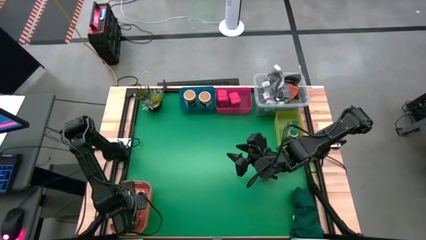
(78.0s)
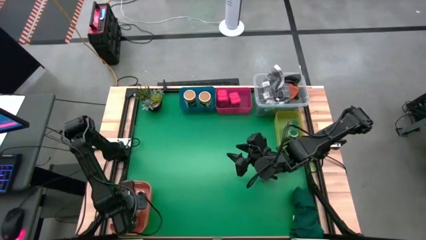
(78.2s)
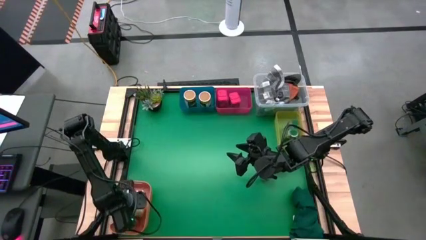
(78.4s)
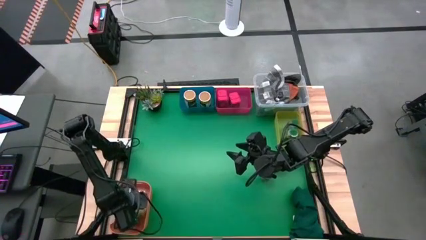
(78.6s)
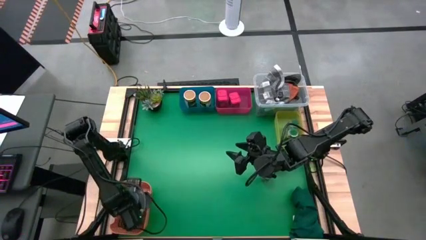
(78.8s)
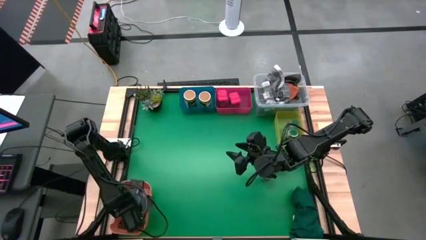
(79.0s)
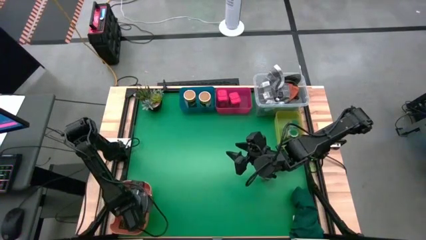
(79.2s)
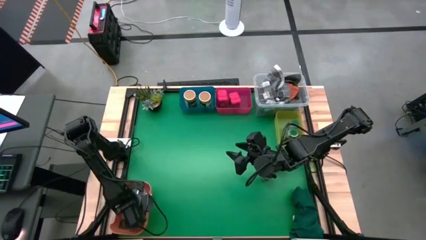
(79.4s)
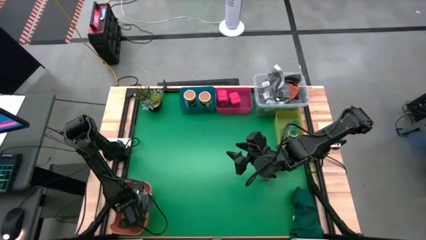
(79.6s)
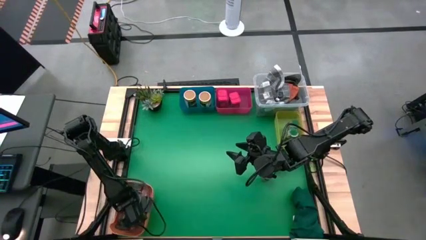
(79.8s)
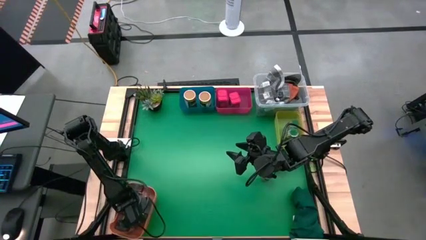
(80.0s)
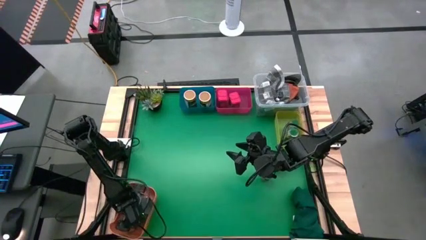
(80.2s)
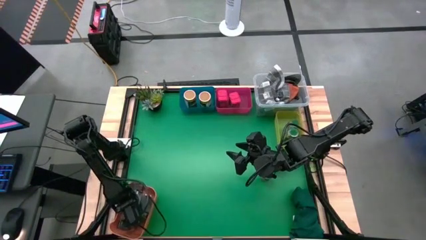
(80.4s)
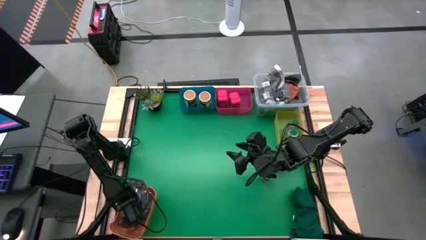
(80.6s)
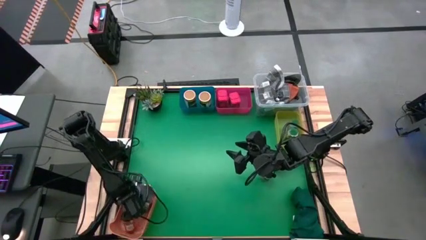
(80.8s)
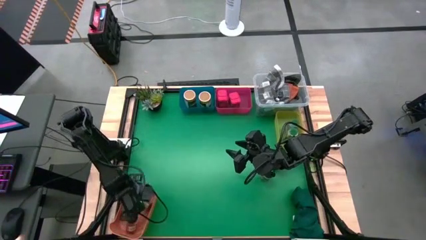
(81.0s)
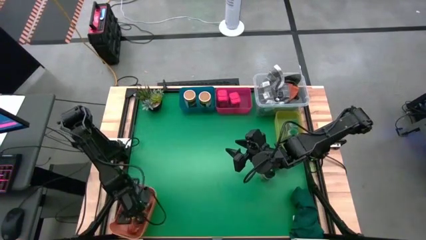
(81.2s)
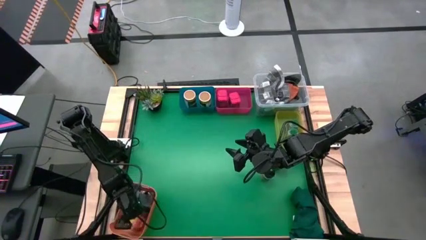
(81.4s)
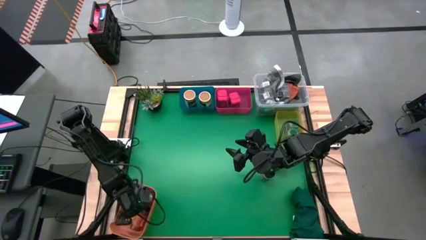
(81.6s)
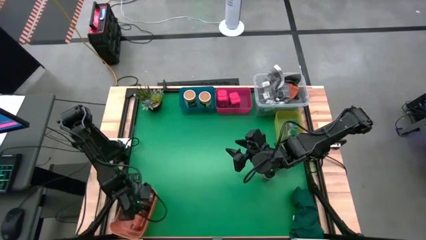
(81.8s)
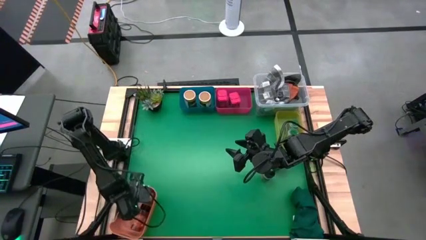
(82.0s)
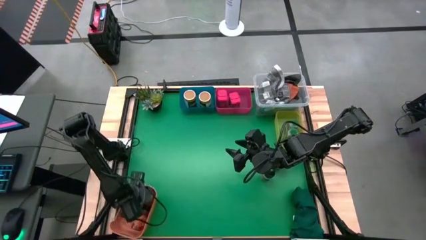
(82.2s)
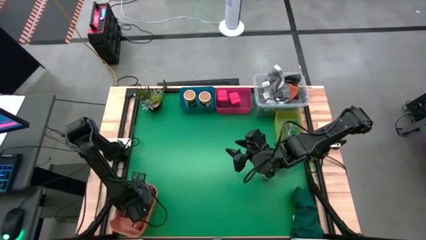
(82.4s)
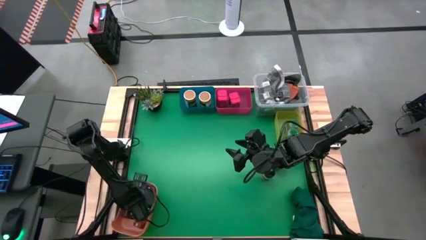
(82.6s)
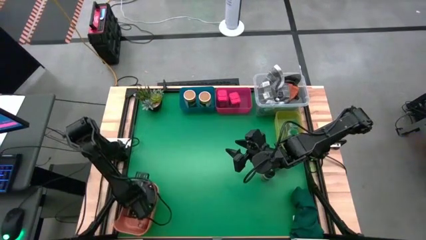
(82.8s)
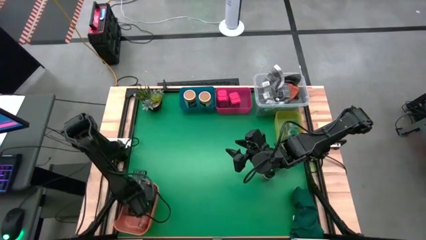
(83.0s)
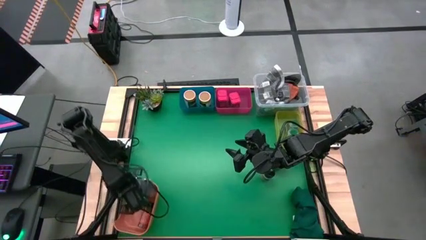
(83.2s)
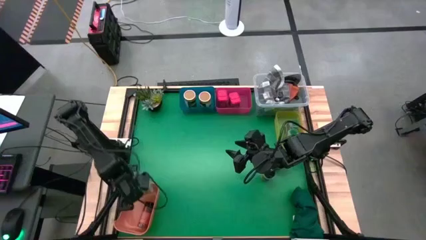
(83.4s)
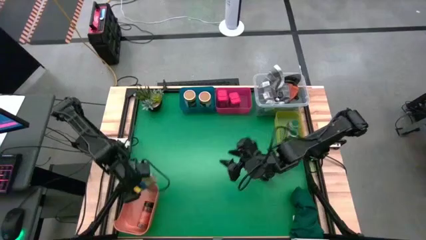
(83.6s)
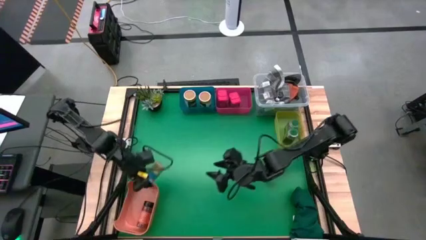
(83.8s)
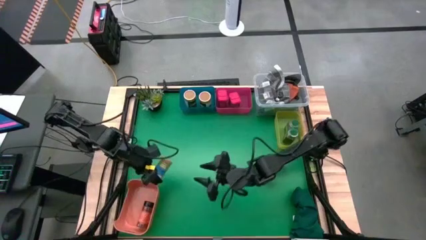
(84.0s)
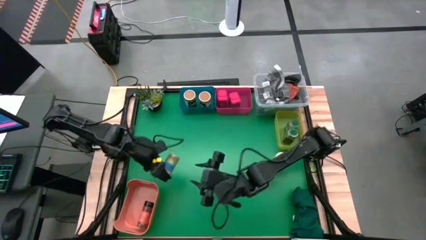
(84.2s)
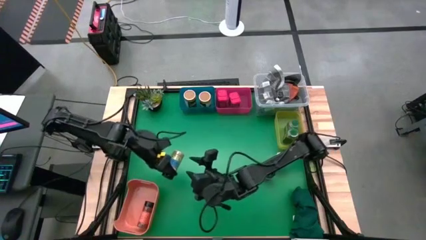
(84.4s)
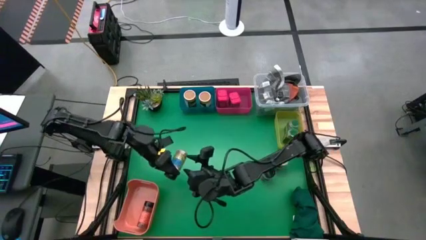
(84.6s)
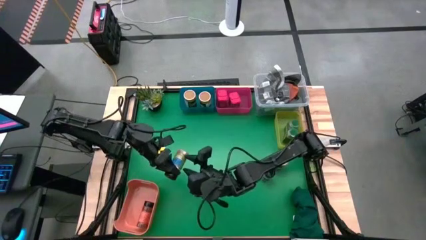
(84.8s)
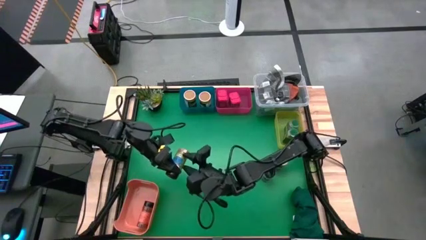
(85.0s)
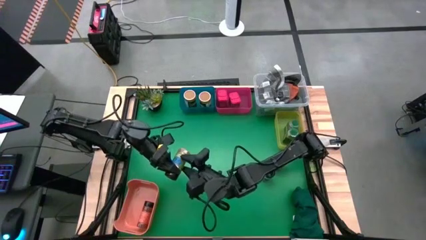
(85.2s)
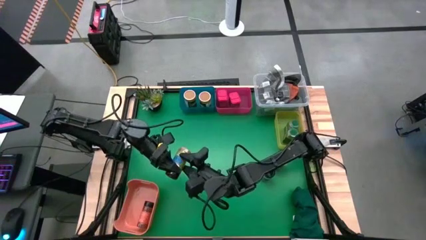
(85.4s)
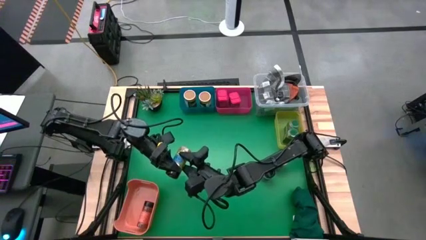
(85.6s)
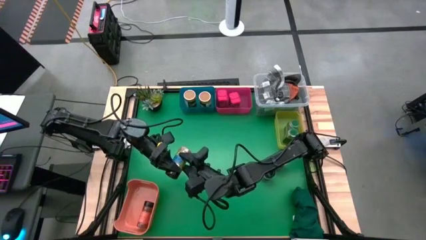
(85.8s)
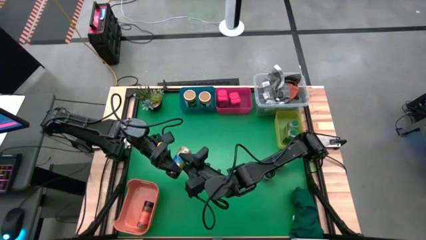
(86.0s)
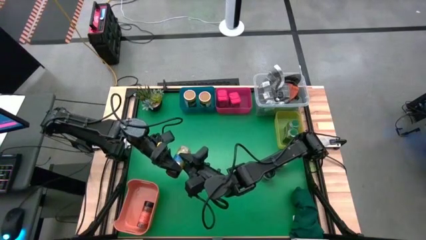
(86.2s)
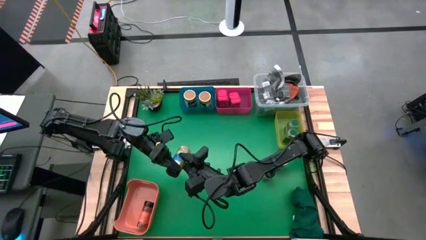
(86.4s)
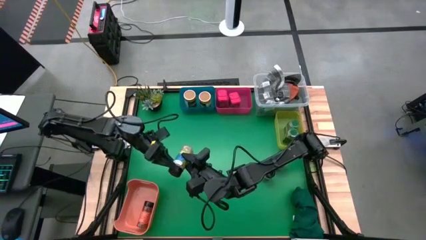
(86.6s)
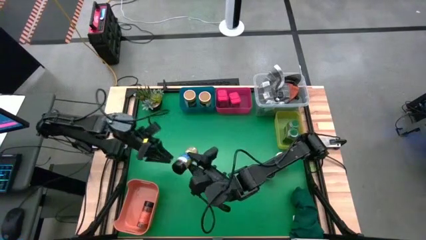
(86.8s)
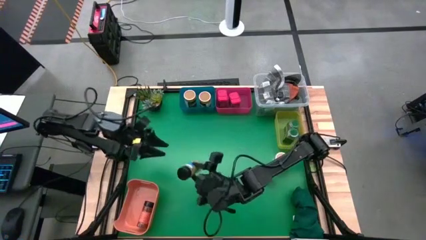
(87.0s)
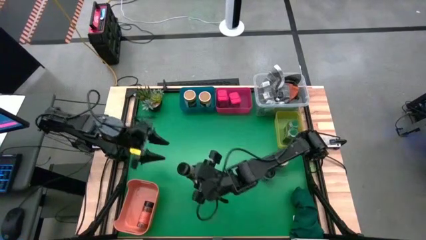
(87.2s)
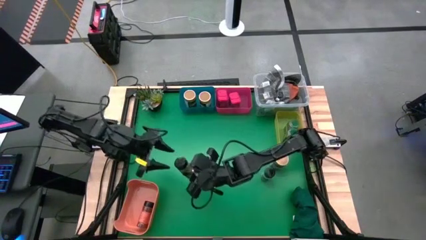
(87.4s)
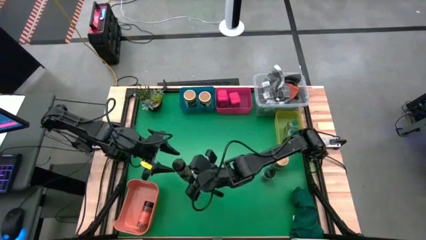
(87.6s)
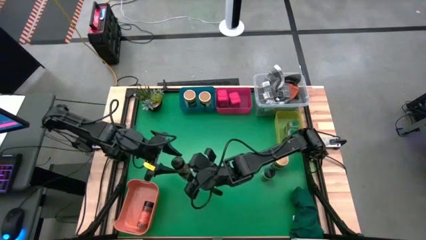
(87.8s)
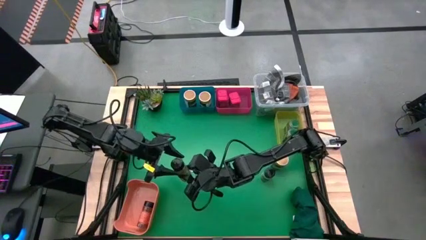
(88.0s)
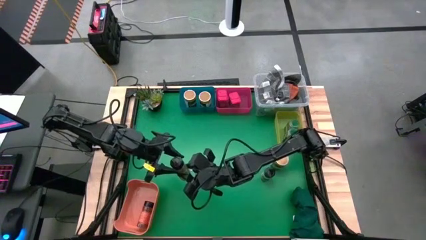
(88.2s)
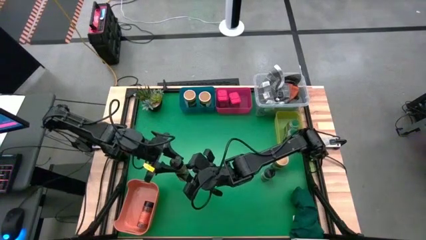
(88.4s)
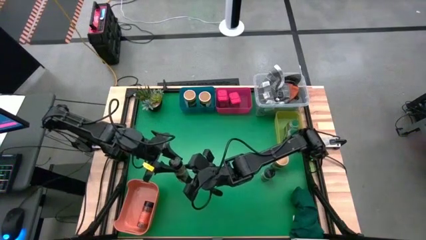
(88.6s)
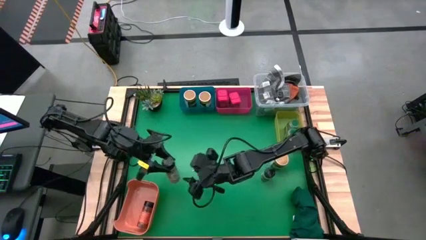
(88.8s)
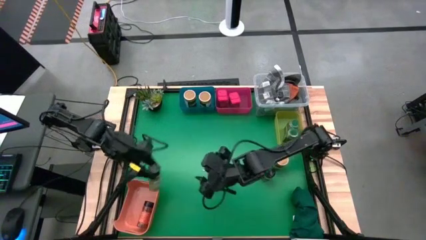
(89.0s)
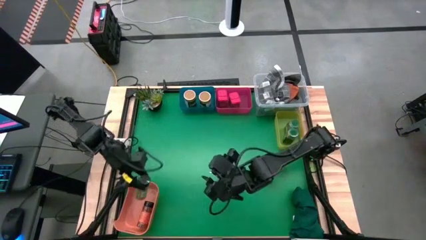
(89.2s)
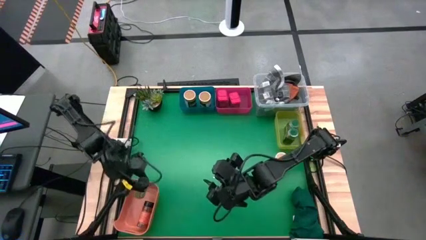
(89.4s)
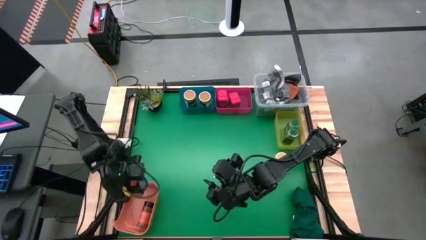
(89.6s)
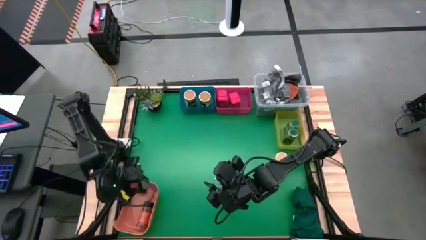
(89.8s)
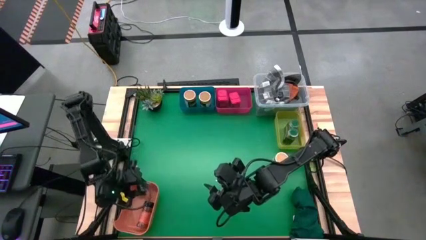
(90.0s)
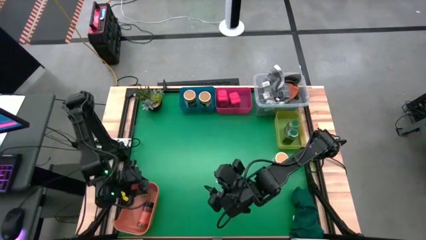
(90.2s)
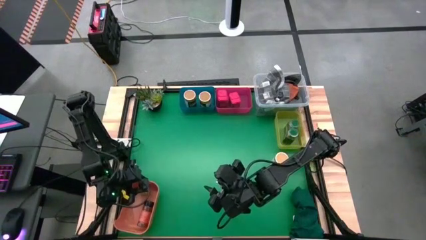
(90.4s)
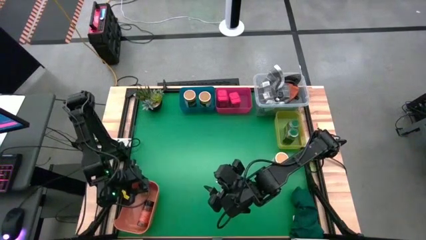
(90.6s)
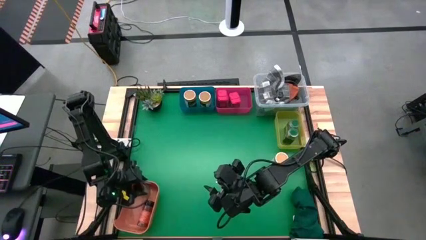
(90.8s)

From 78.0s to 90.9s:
Task: Sort spices by type
Put the left black spice bottle into the orange bin

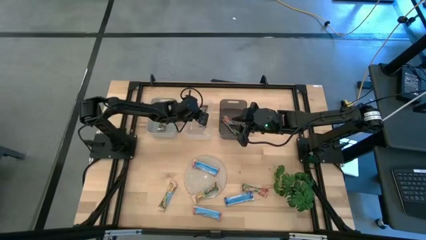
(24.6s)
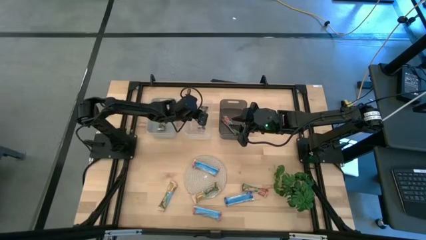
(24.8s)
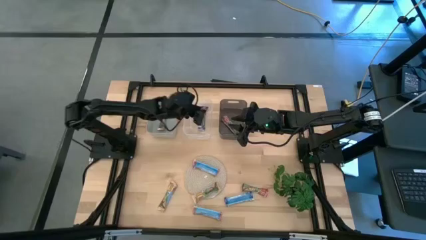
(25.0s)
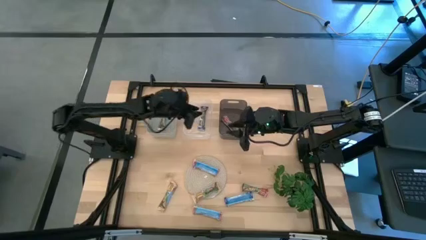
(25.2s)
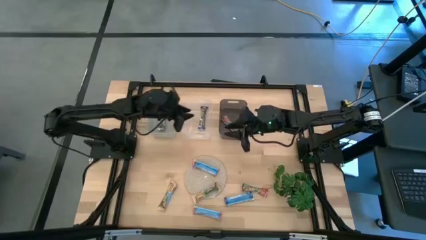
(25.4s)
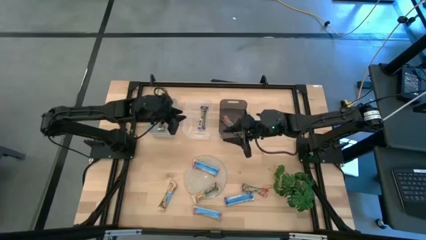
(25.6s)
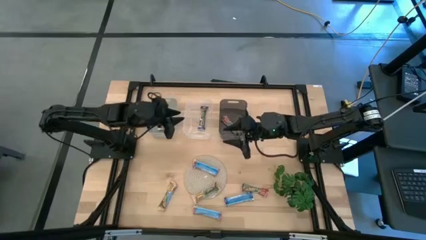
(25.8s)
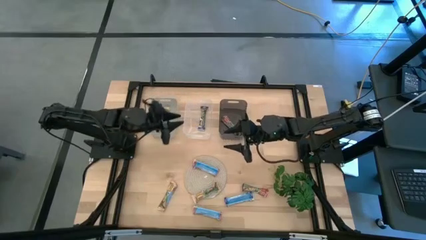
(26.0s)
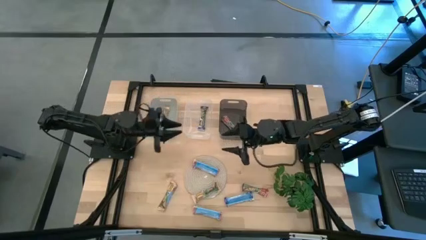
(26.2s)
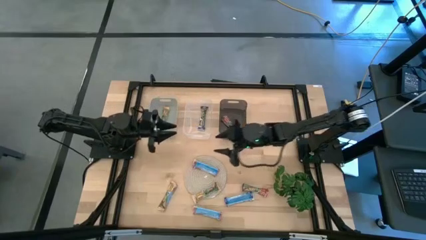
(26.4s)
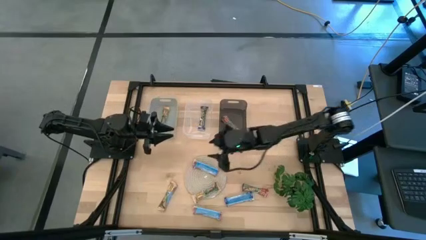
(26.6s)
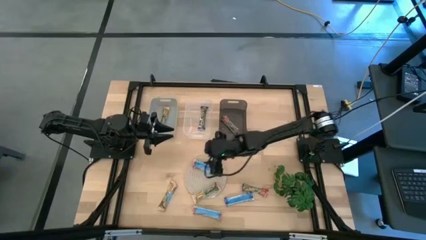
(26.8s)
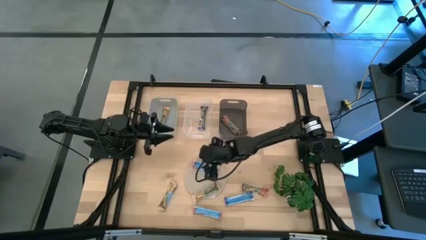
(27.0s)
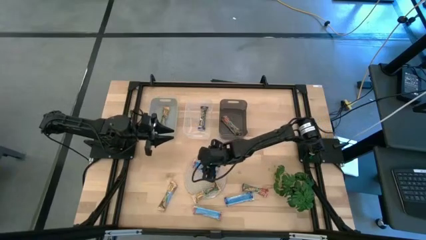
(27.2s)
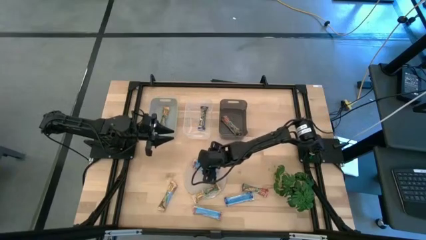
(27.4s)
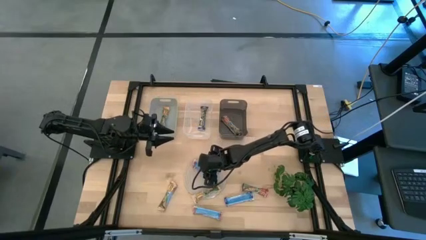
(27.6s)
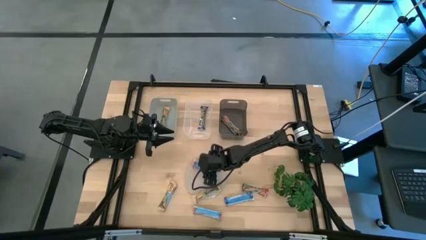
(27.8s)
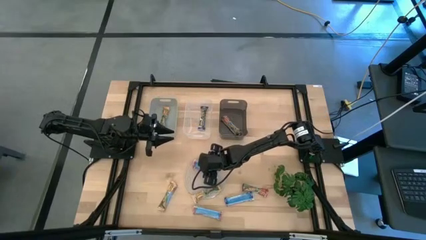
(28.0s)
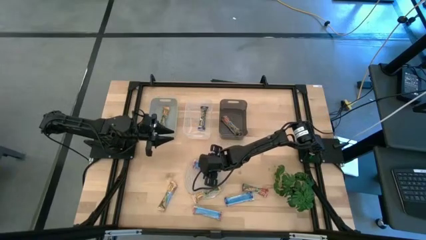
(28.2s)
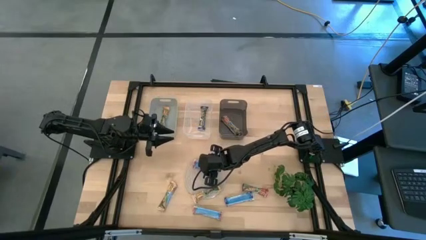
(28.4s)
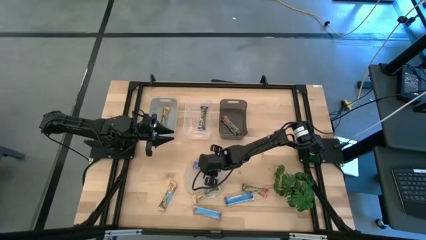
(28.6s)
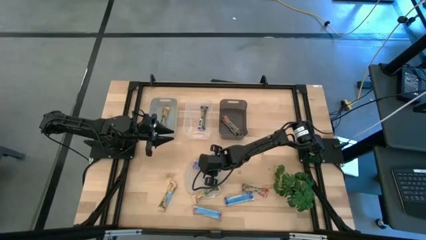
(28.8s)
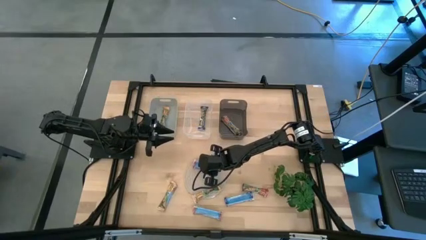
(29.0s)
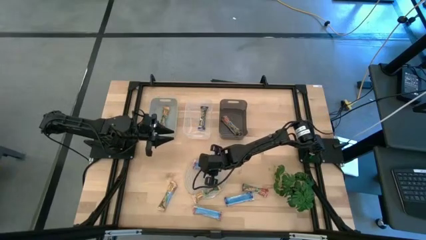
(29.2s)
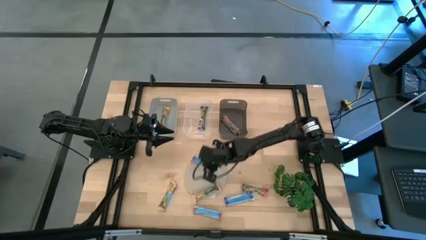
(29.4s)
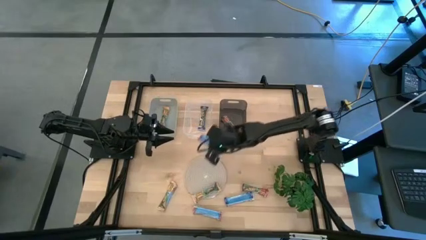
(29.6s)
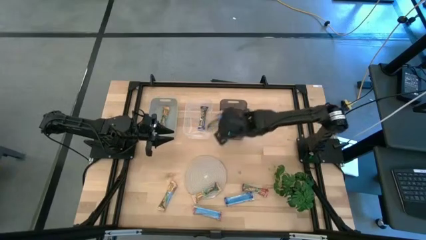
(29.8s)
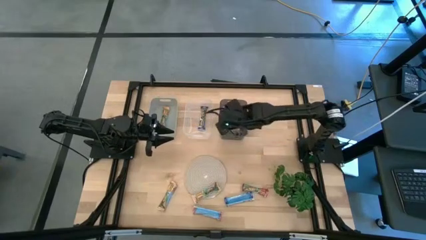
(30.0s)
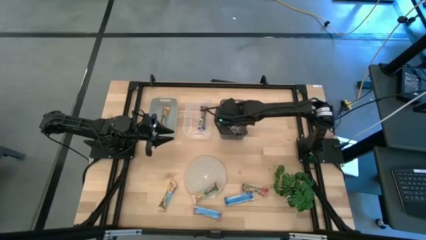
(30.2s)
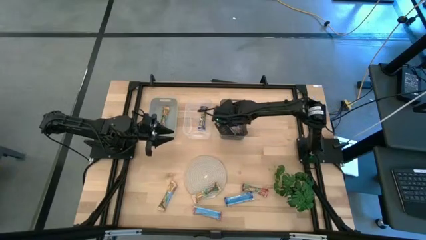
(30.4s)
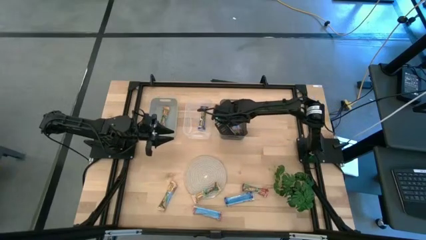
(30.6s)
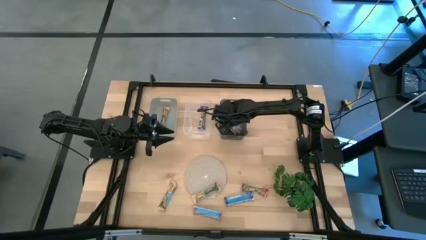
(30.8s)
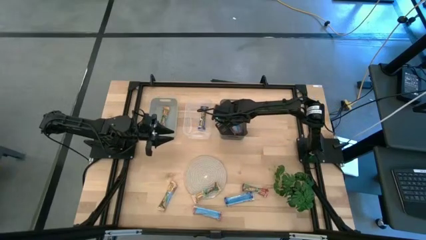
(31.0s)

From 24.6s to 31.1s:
Task: Pick and place Granola Bars by type
Put the red granola bar into the black bin
